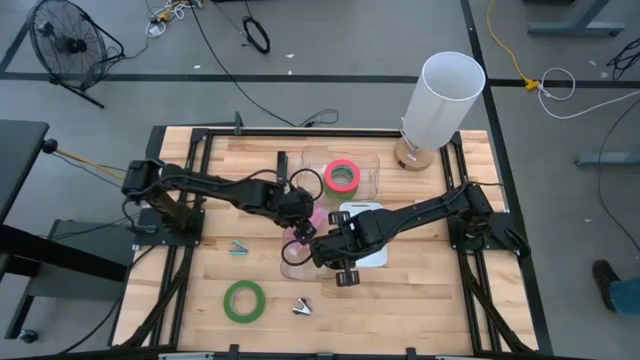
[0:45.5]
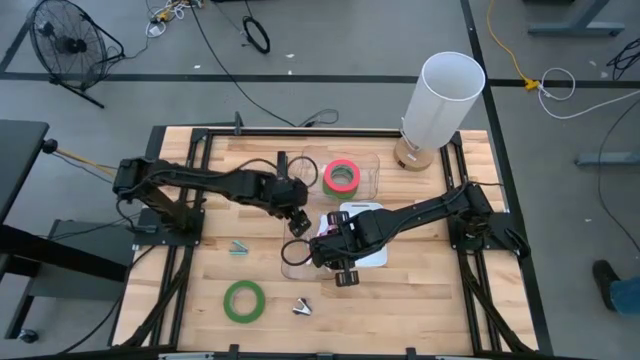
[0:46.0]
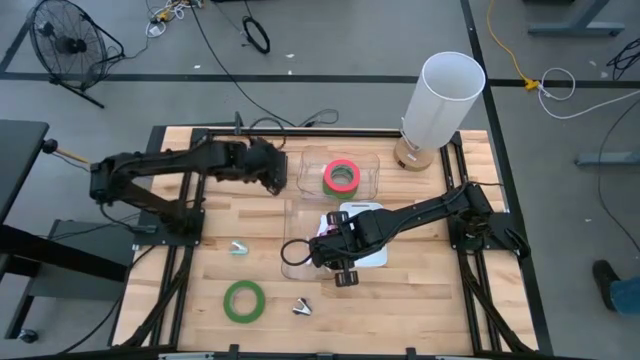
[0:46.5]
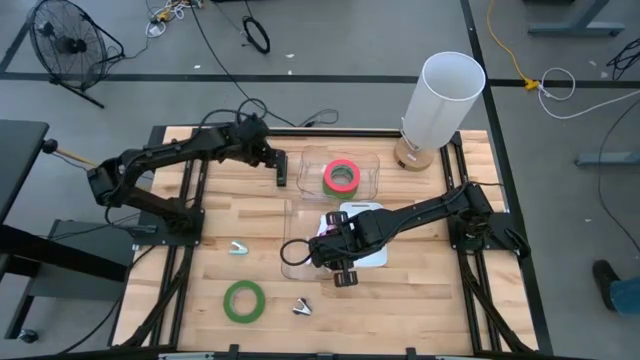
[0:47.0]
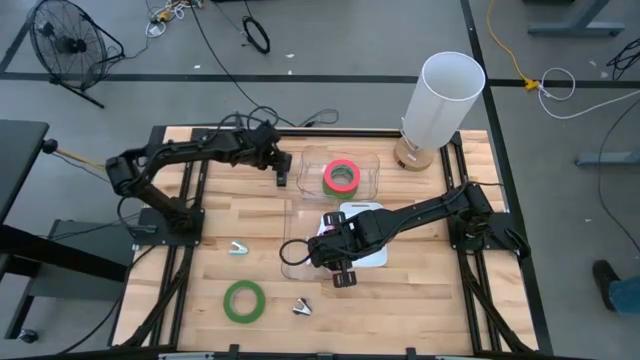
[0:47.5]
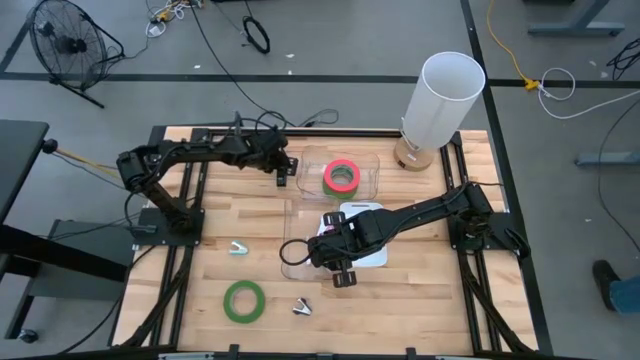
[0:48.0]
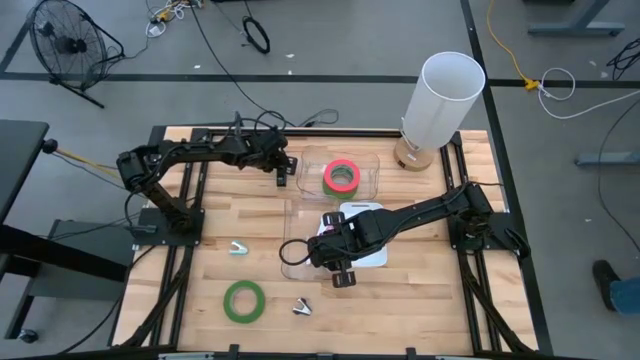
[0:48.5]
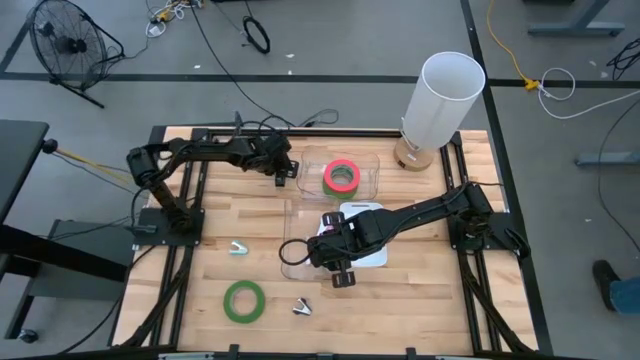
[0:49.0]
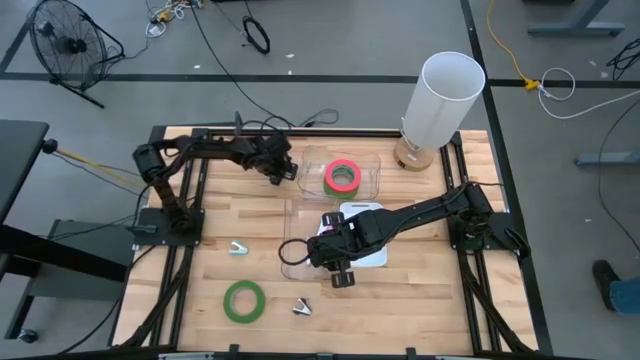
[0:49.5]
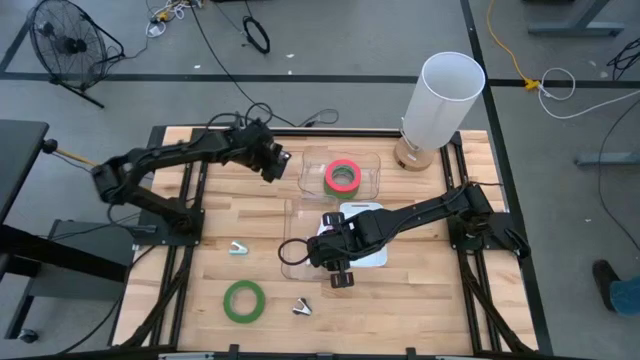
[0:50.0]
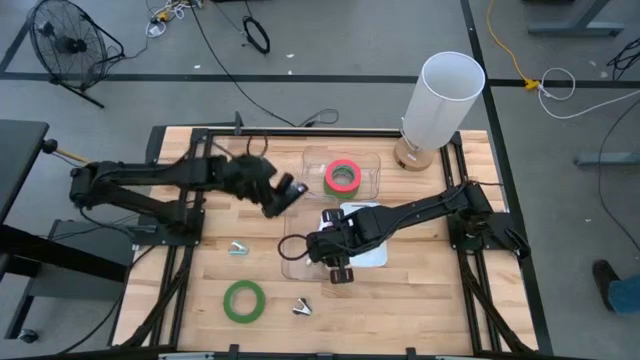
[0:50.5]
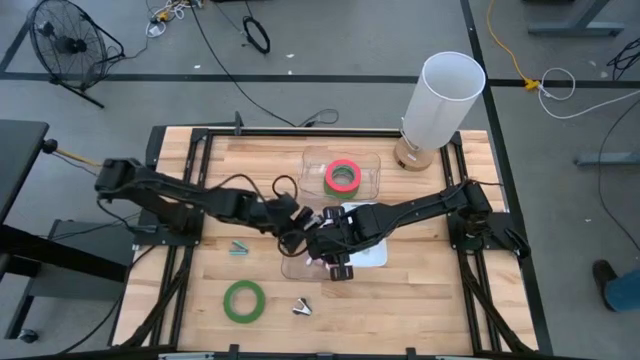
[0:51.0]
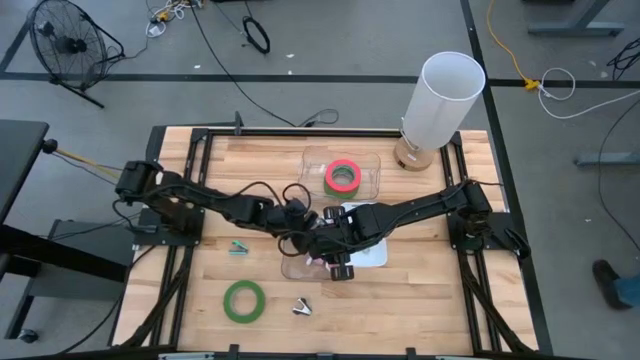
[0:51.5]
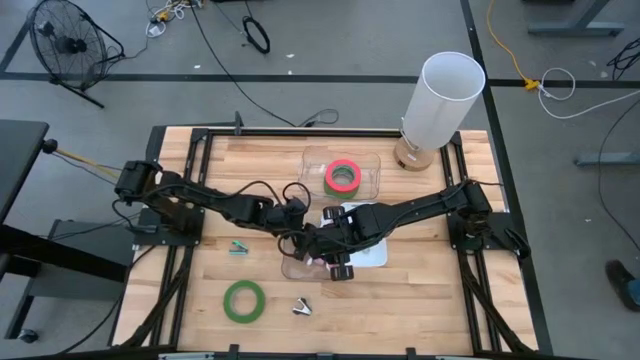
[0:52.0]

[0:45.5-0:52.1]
Task: Pick and place Stapler, Stapler remover, tape
Put the black stapler into the bottom transparent bin

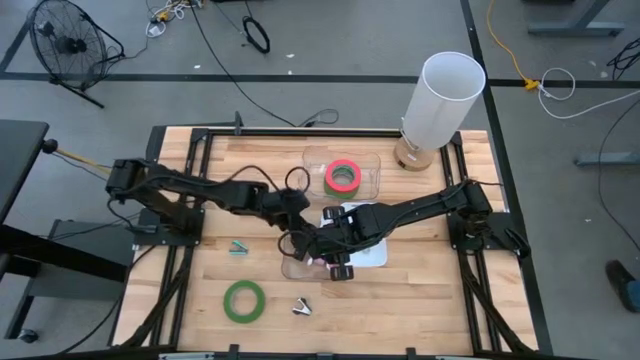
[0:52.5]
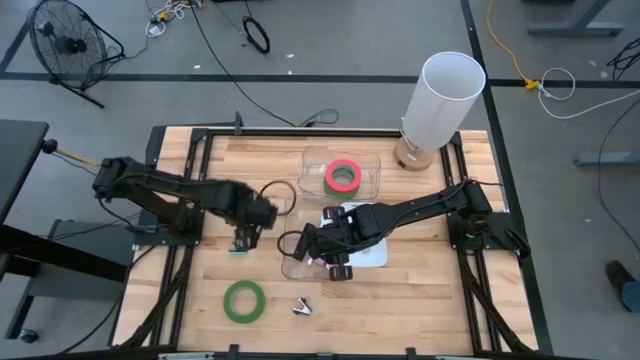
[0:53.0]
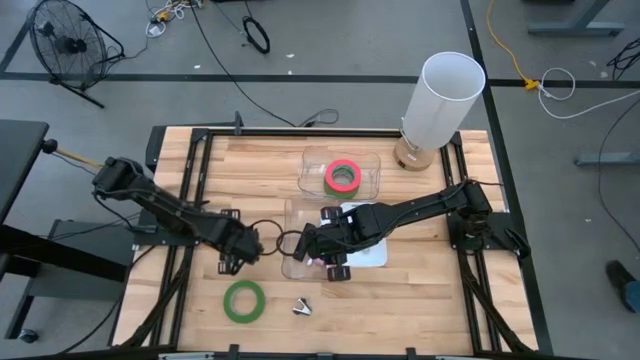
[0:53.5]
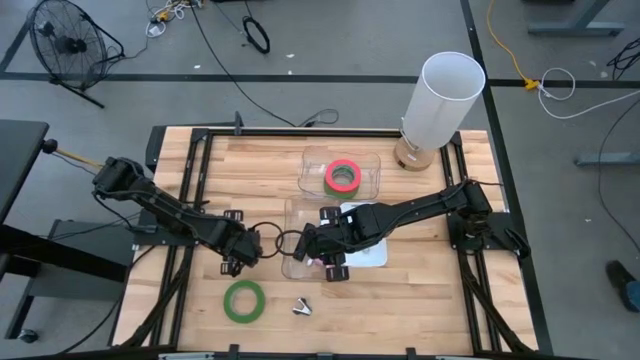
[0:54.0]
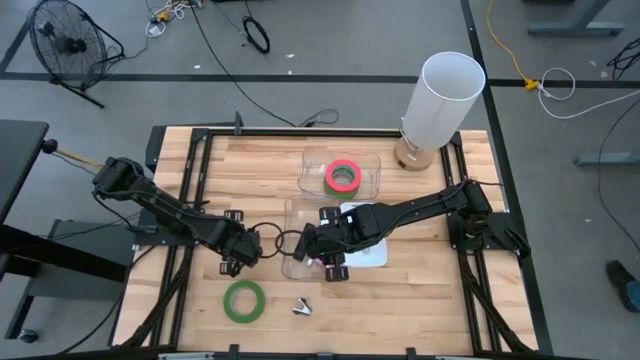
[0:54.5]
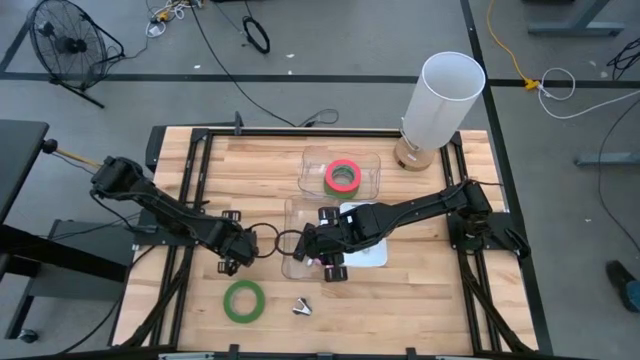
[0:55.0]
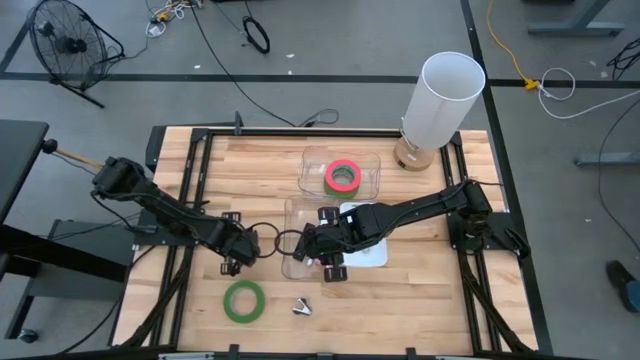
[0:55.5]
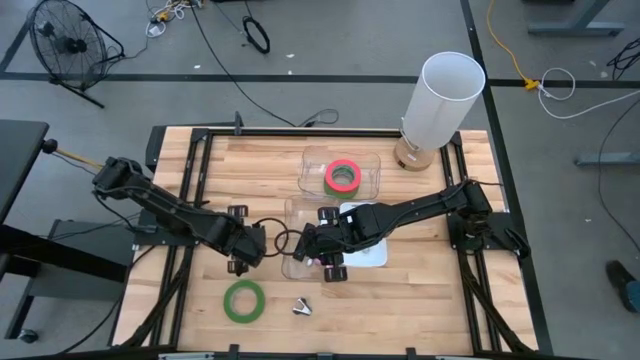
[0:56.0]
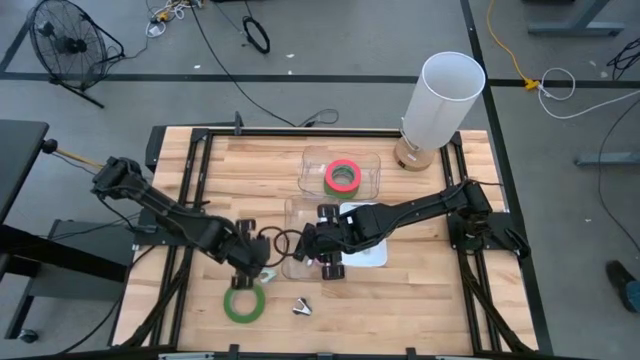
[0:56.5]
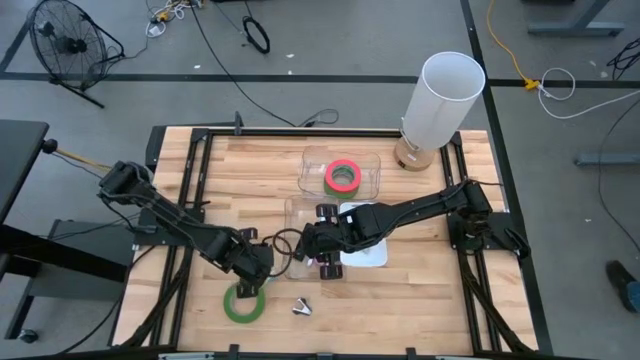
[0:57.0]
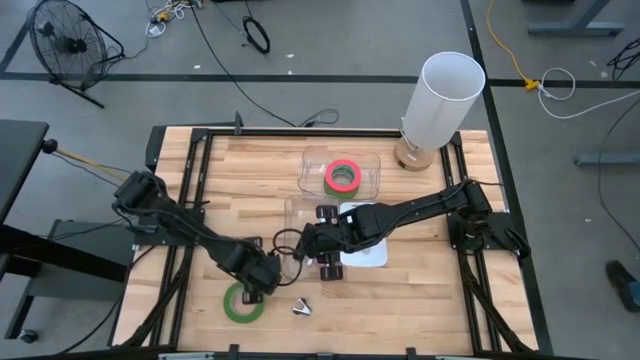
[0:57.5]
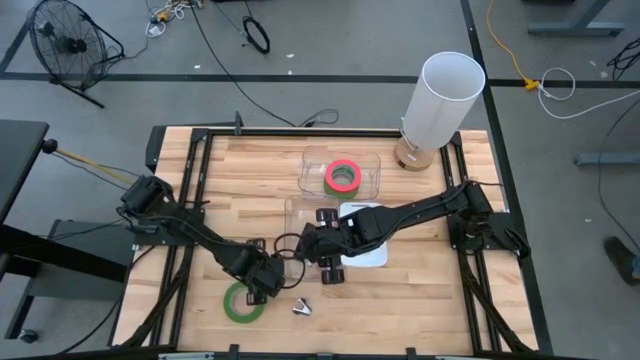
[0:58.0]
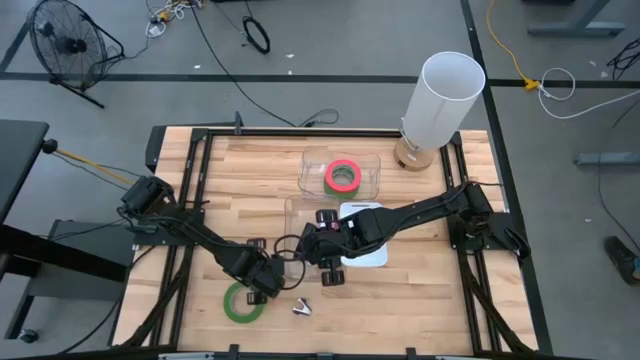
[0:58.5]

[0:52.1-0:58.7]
Put the blue staple remover into the white bin

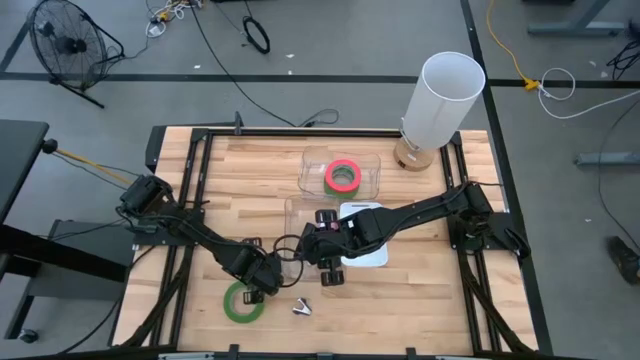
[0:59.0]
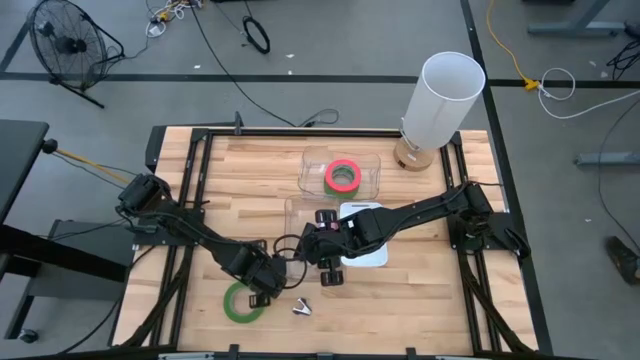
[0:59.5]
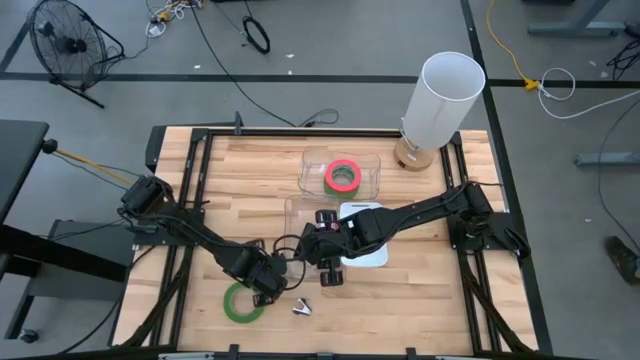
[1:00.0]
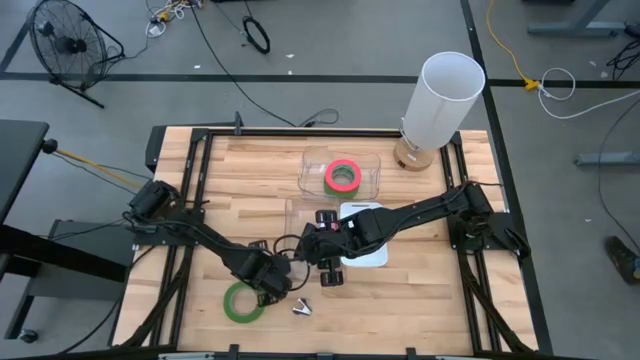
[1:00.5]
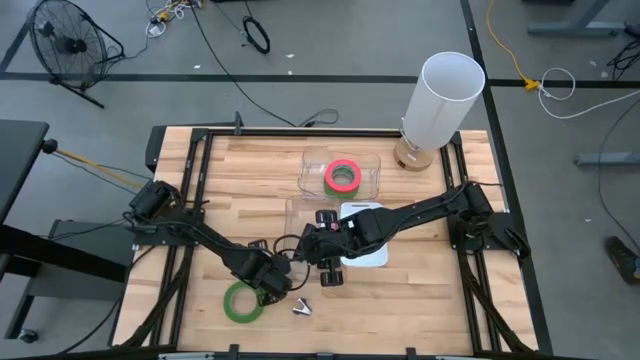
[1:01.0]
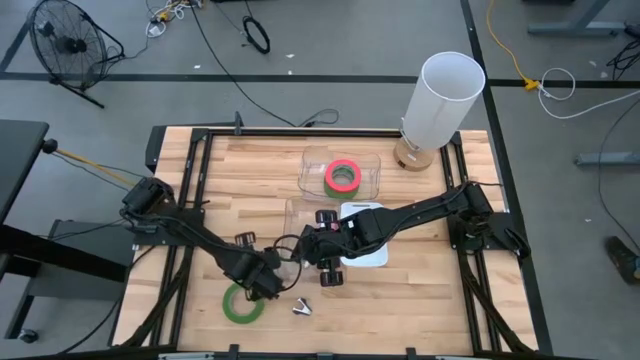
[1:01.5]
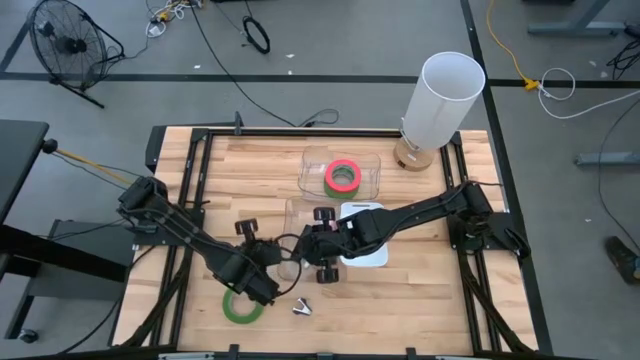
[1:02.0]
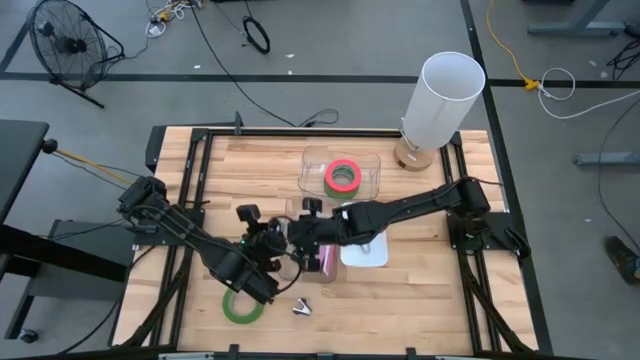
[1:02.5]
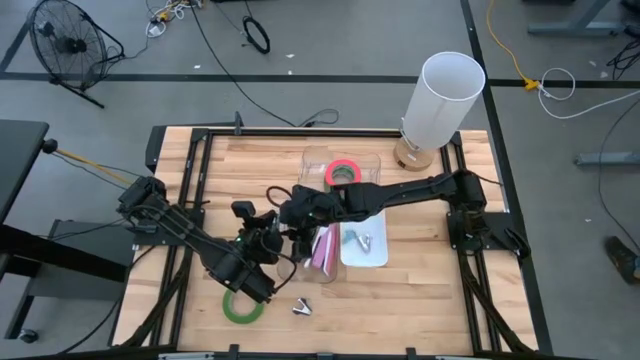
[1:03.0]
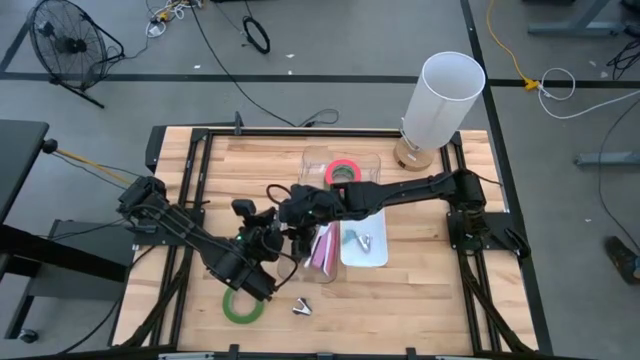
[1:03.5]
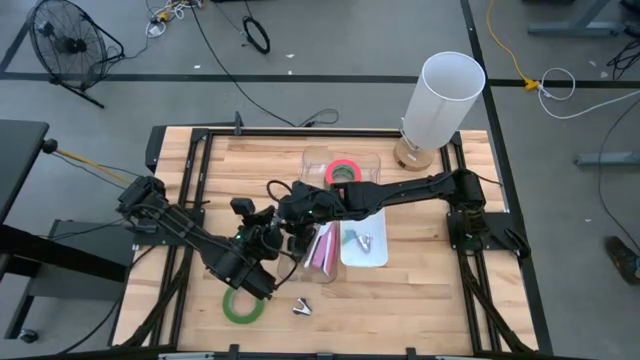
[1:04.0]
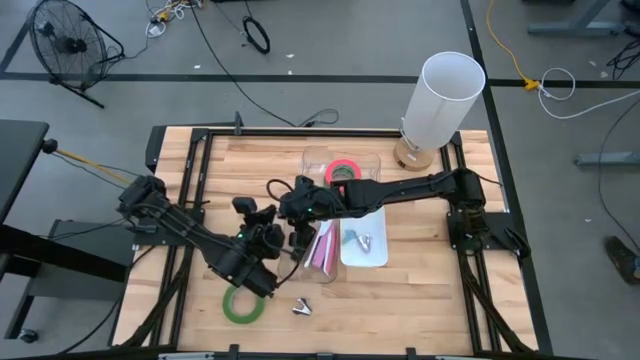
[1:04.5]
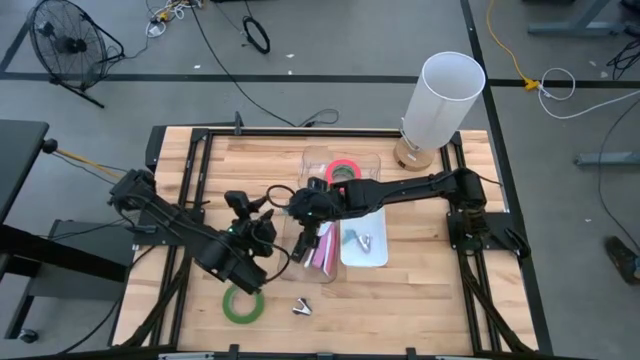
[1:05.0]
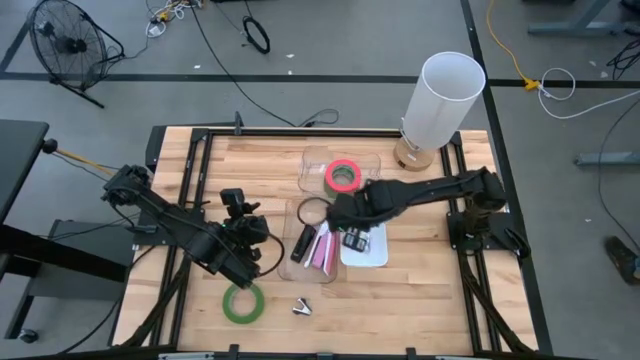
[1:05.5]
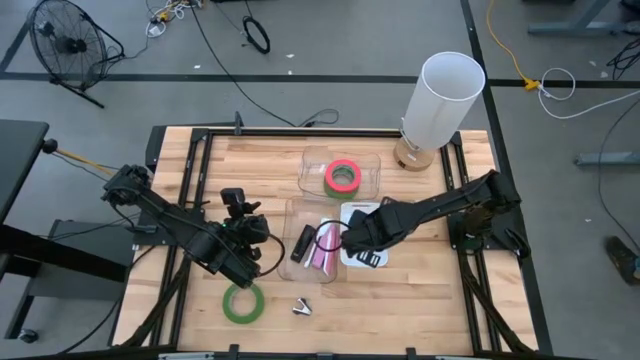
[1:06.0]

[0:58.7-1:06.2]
Put the blue staple remover into the white bin

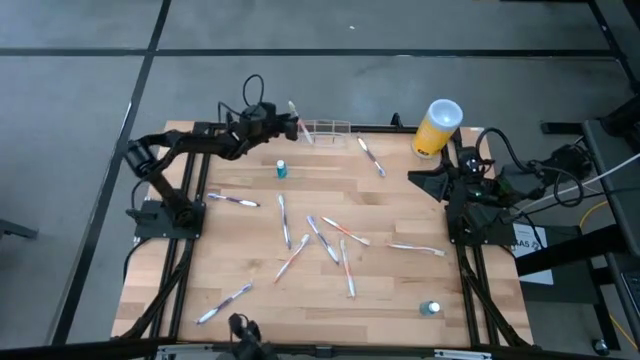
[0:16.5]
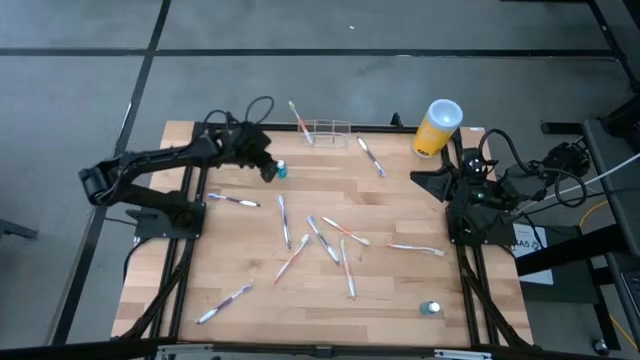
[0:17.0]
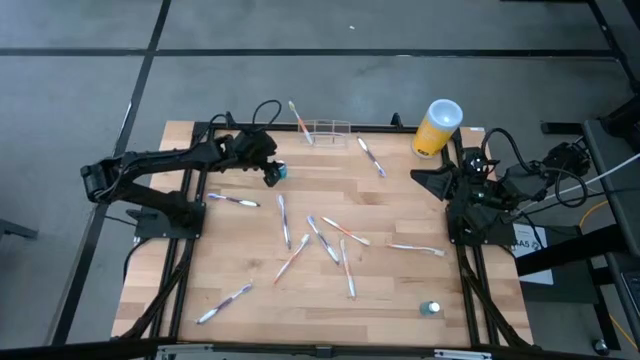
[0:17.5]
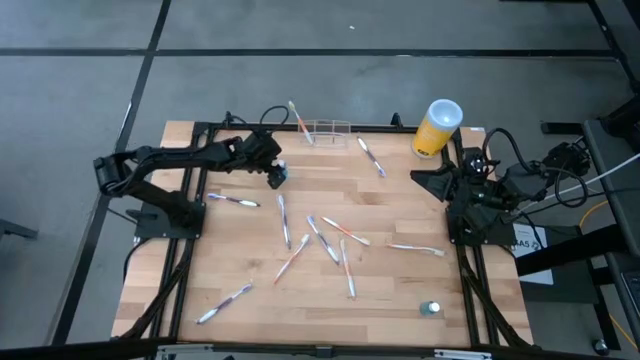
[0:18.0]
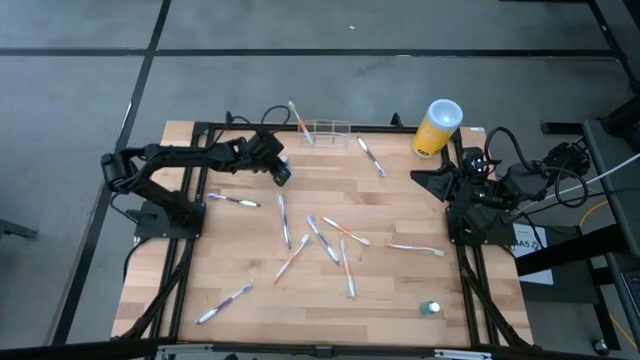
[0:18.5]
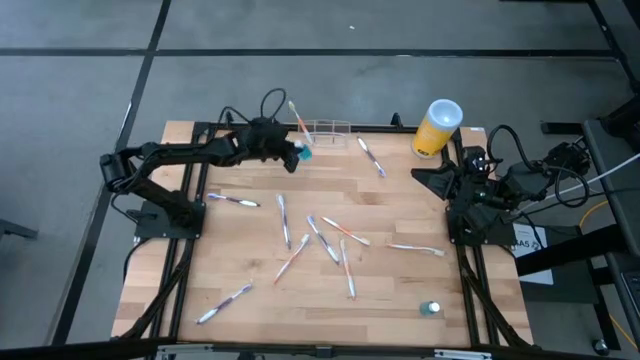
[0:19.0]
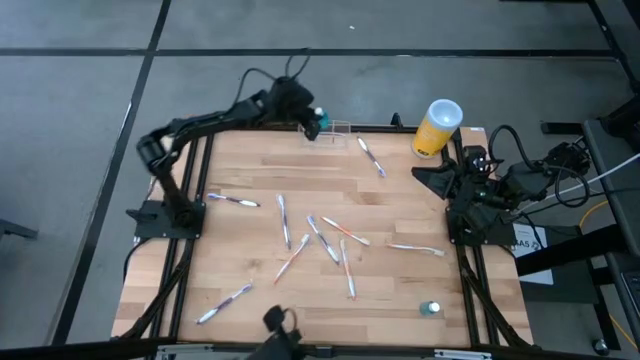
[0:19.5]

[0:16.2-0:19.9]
Task: Pick & Place toothbrushing station
Put the blue mouthwash into the transparent organizer
